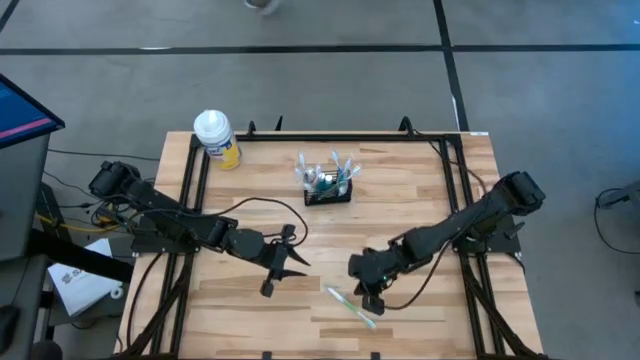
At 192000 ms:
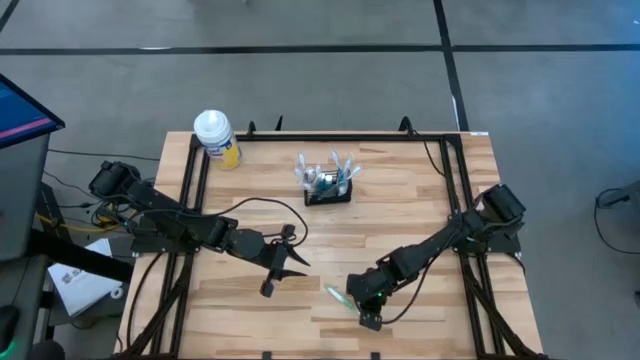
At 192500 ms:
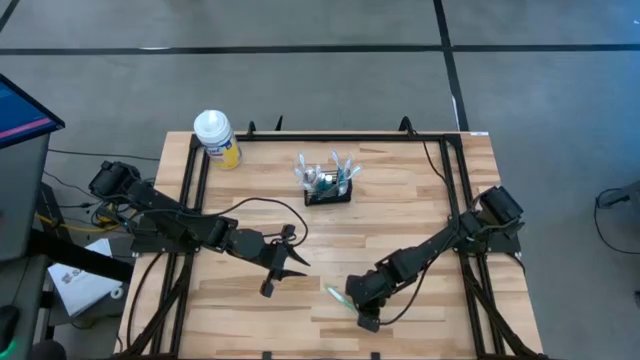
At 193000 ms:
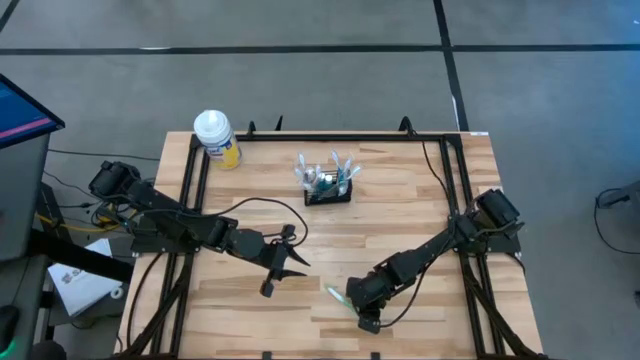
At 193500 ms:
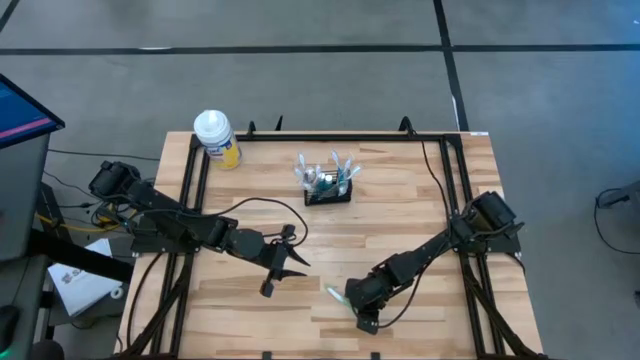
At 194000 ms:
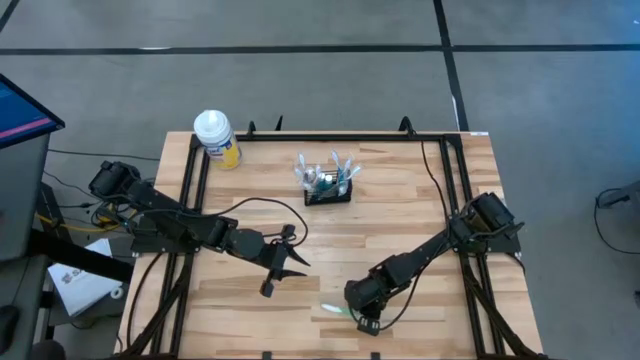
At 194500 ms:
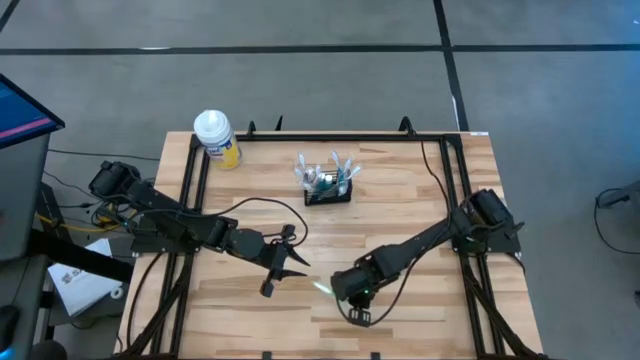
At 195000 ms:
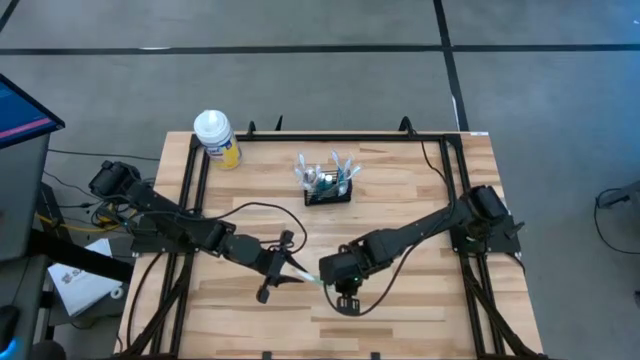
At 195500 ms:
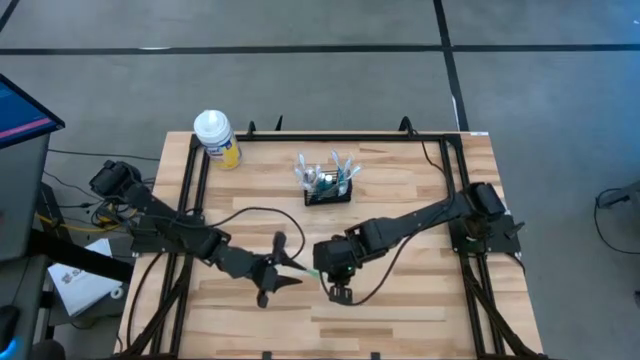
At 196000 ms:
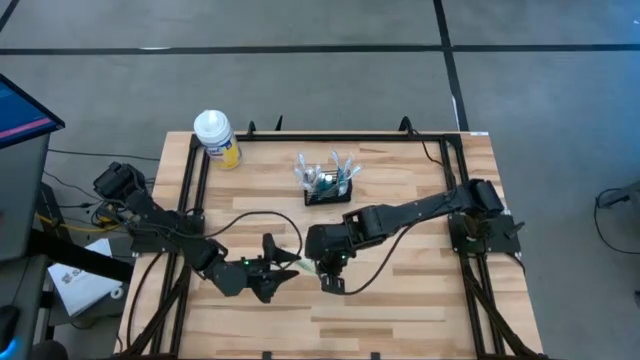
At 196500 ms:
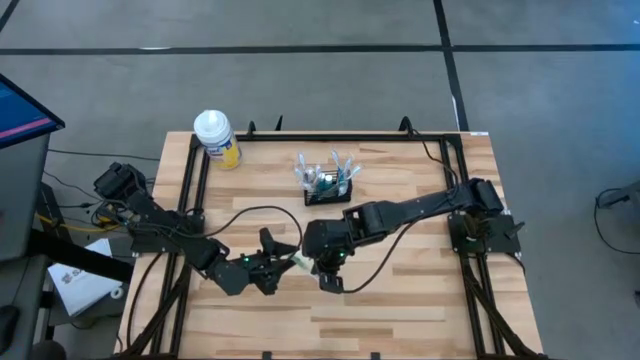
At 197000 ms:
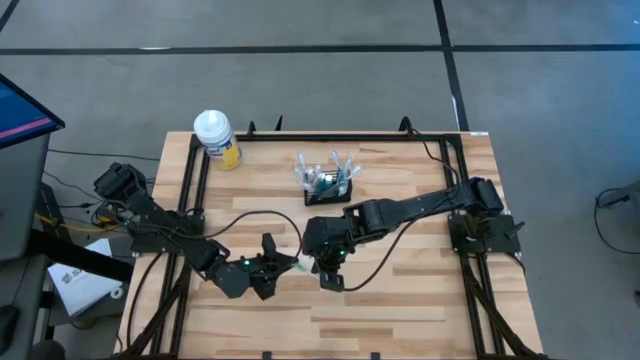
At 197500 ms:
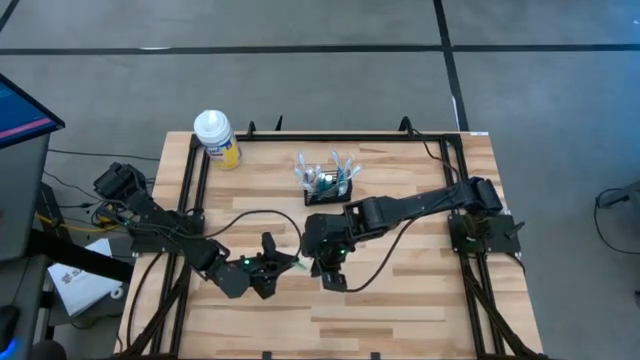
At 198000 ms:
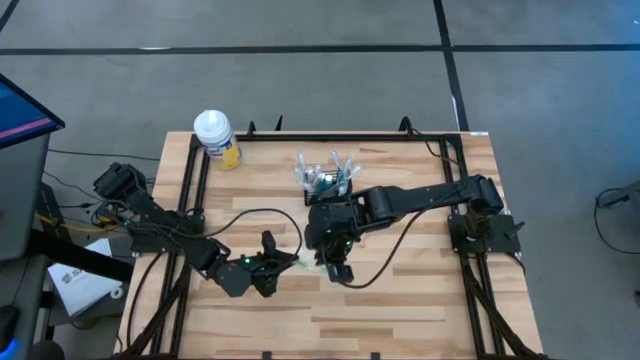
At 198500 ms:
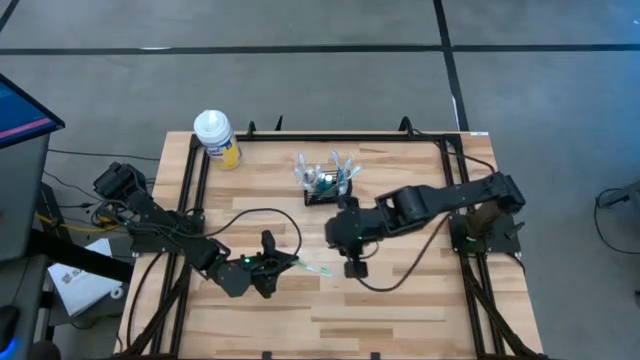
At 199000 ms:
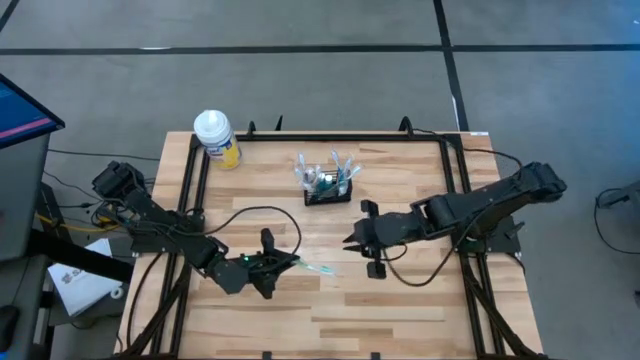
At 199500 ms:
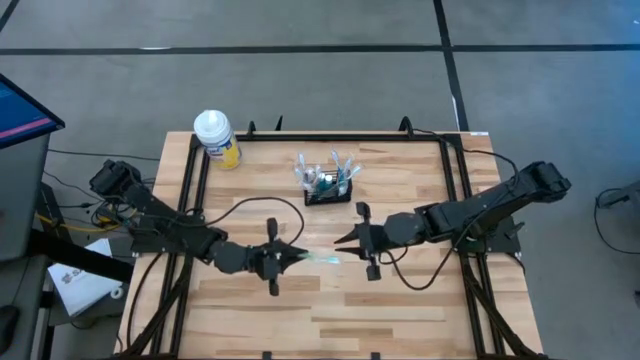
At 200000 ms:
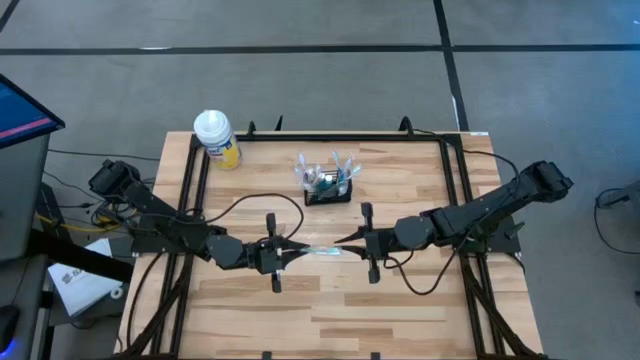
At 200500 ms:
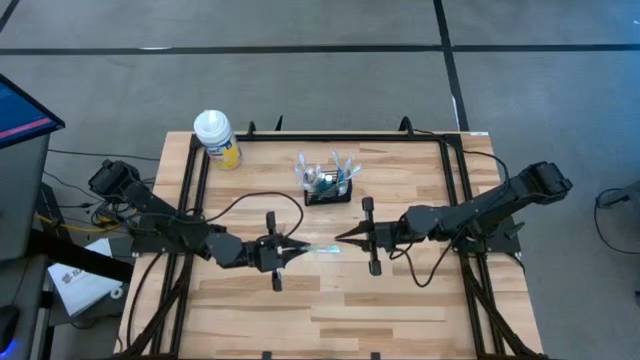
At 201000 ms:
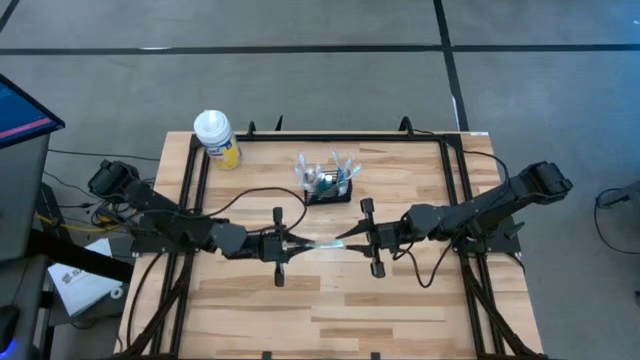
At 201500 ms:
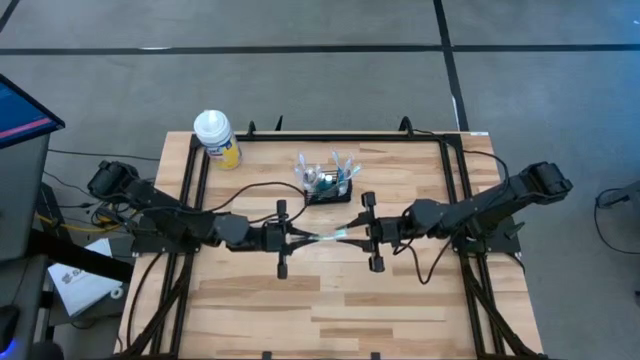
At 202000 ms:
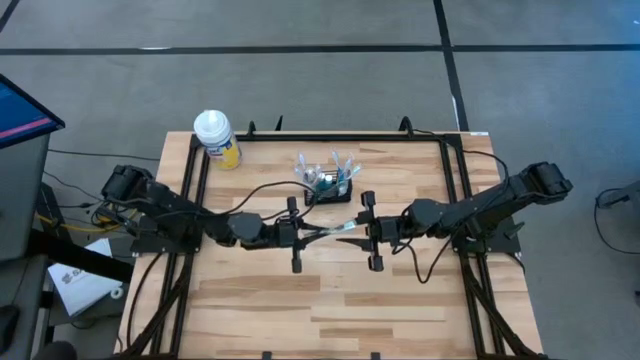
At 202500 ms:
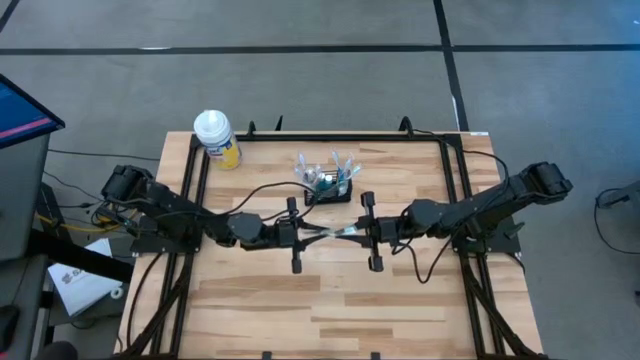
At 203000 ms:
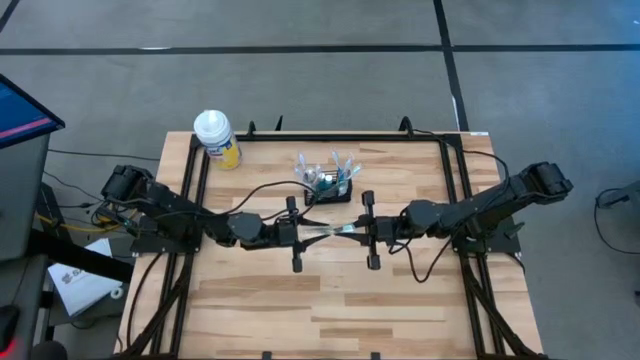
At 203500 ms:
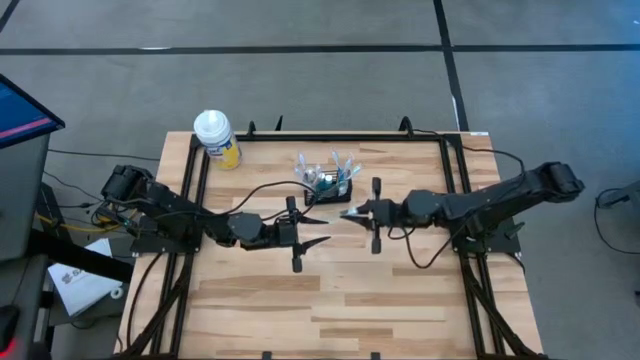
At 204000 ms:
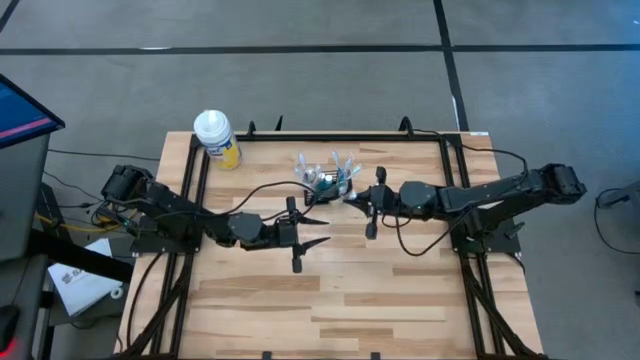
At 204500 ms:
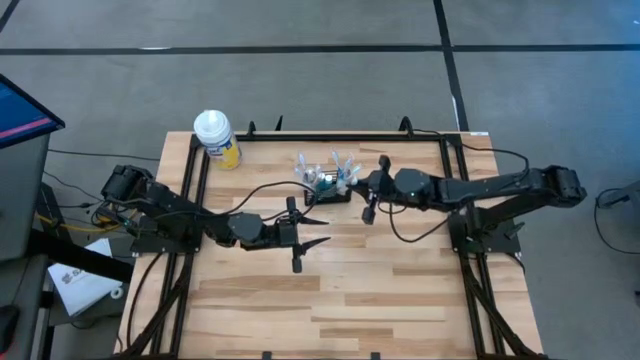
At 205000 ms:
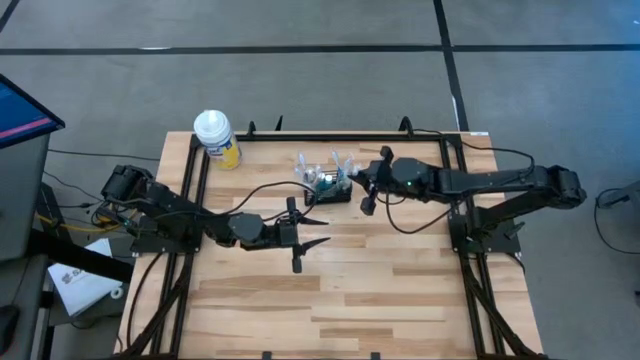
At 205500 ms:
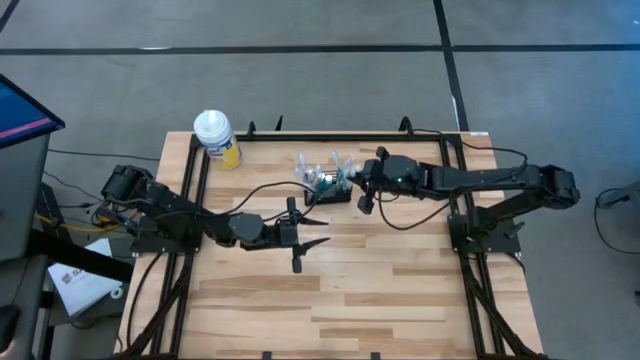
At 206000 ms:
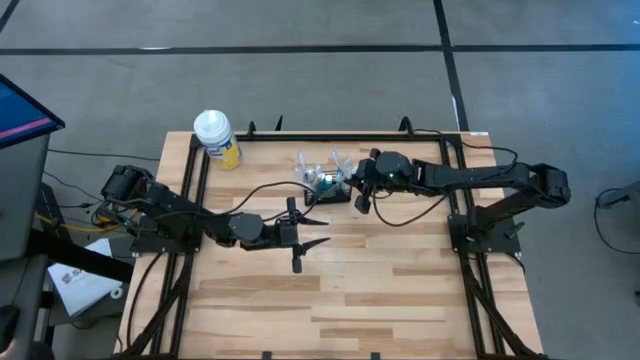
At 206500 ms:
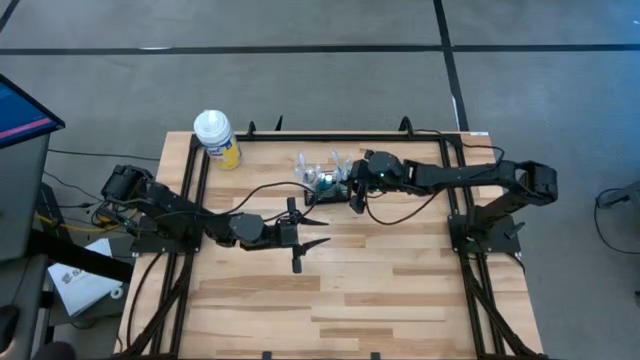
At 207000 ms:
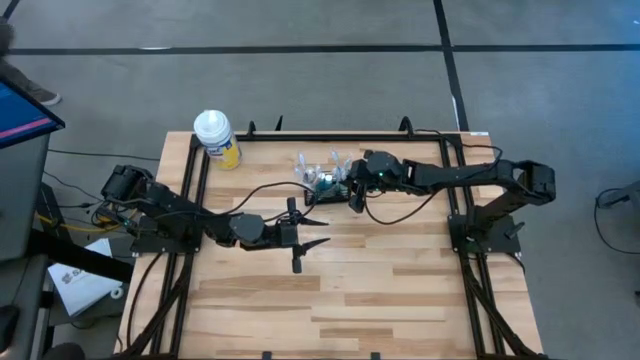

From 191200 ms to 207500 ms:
Task: Pick & Place toothbrushing station
Put the green toothbrush into the black mesh organizer

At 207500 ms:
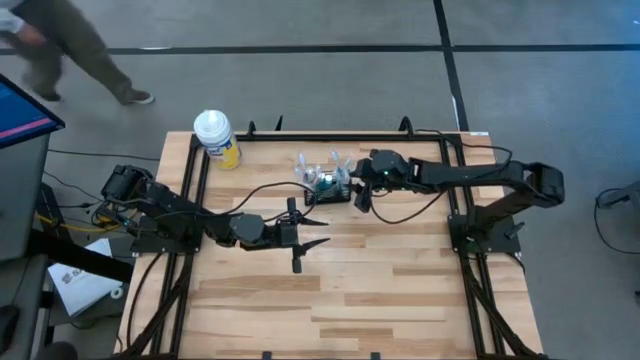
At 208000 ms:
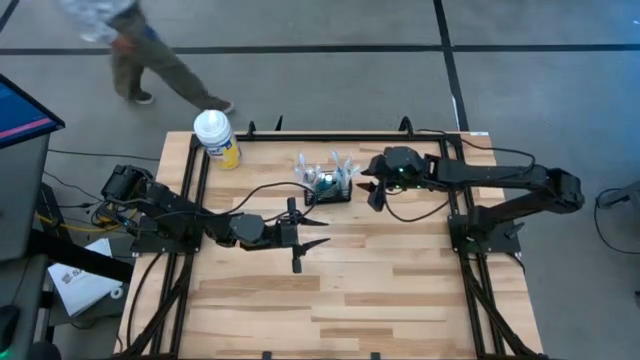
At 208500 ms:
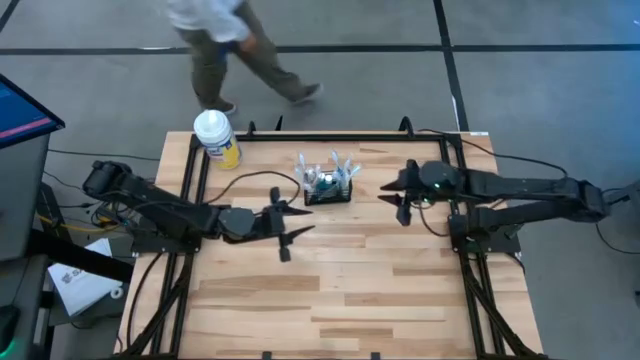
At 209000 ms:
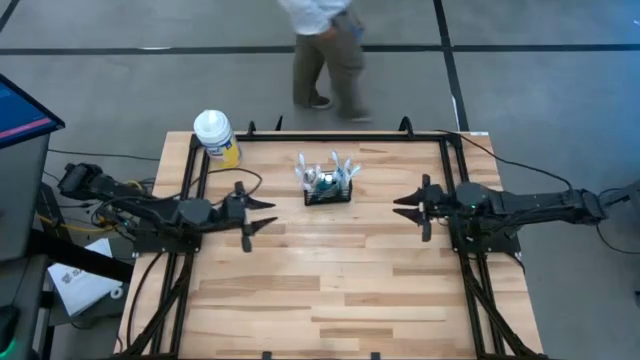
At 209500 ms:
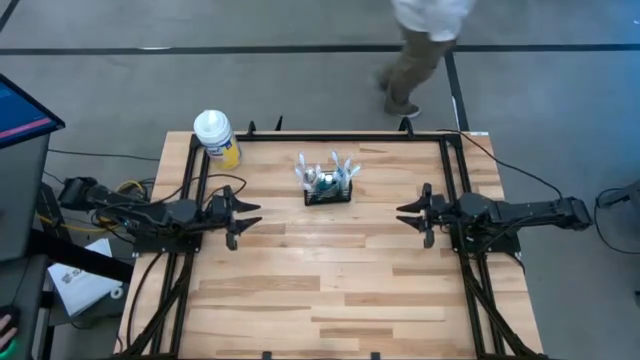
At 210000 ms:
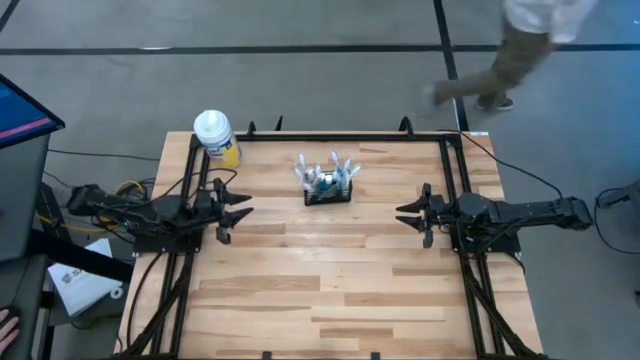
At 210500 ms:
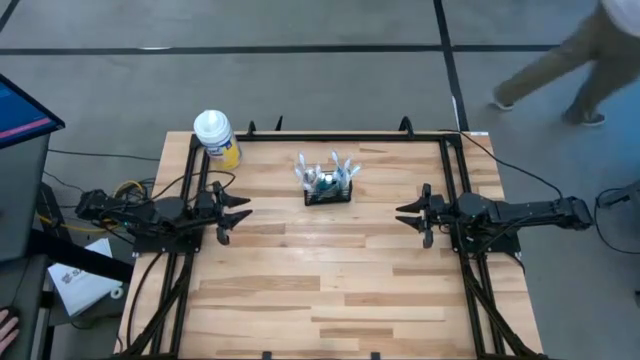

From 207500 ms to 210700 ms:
Return to Home Position

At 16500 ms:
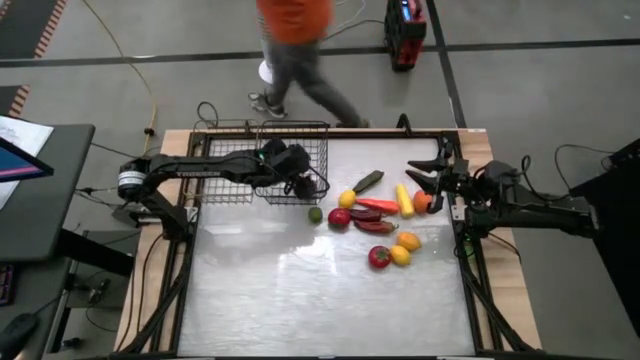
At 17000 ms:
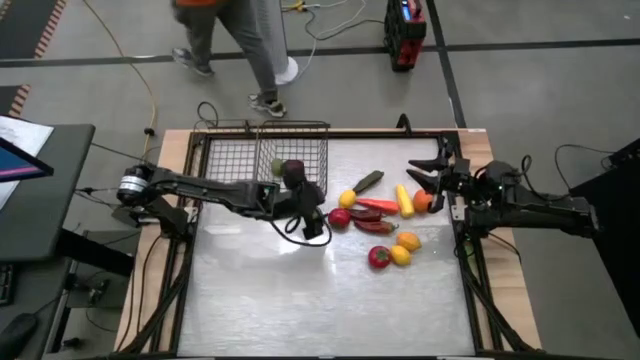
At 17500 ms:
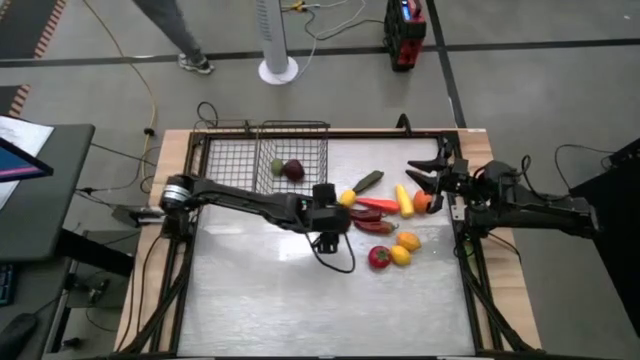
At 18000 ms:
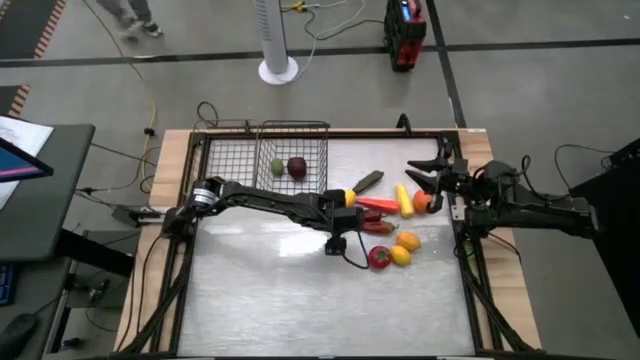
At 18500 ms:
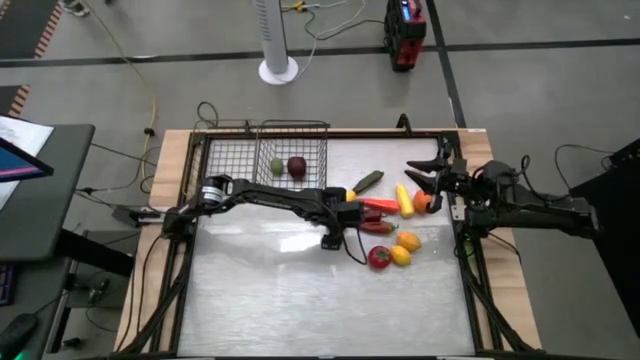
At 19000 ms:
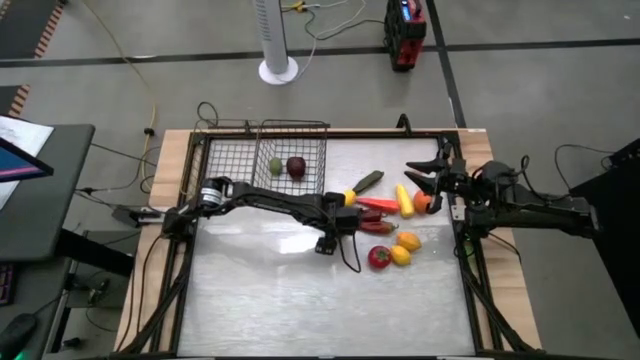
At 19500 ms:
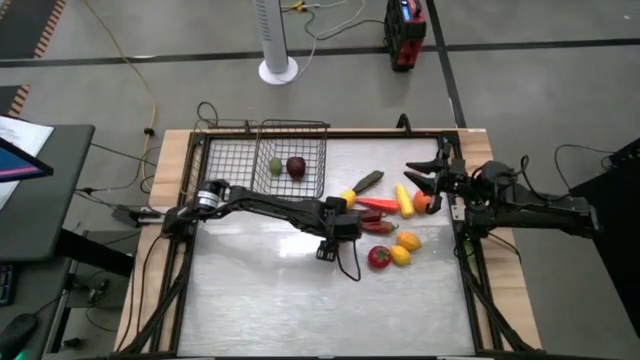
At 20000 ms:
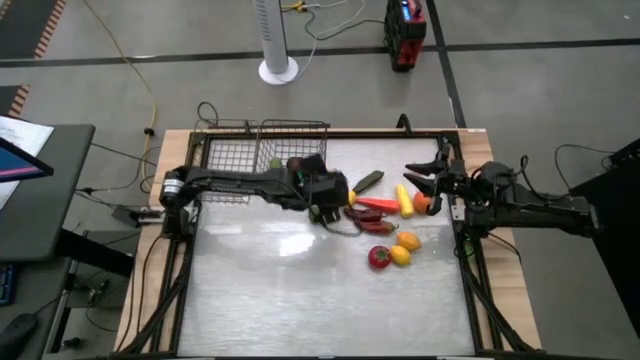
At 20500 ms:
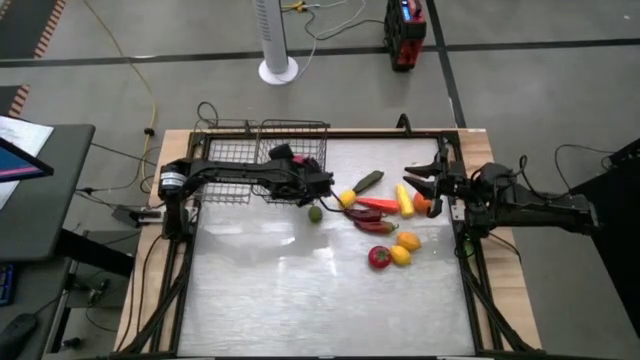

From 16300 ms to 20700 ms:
Task: Sort produce into baskets
Put the top red tomato into the right wire basket
